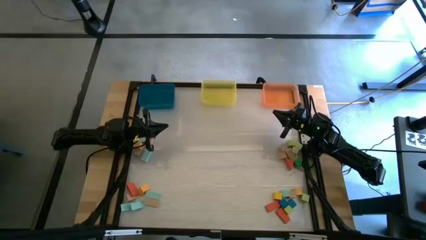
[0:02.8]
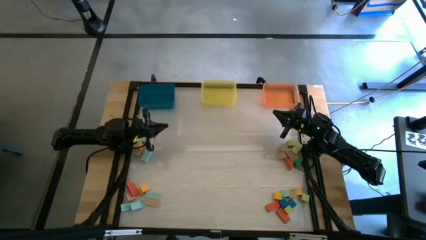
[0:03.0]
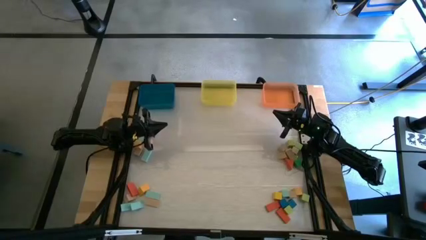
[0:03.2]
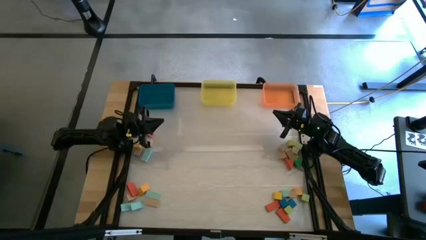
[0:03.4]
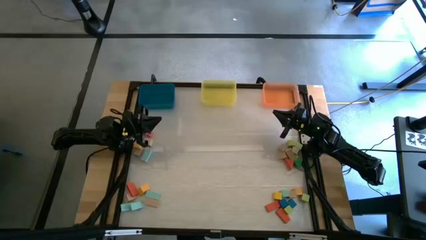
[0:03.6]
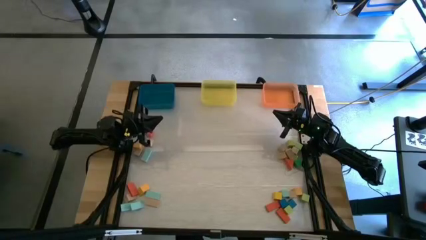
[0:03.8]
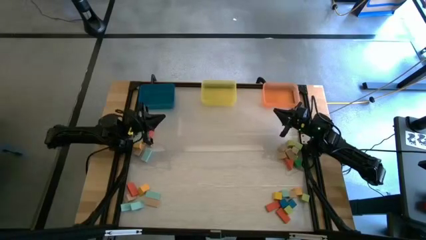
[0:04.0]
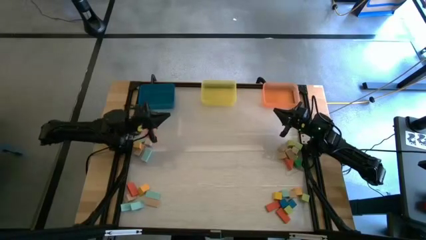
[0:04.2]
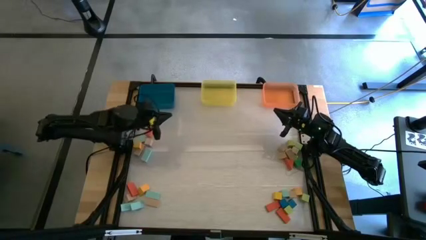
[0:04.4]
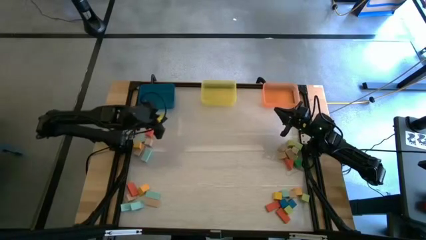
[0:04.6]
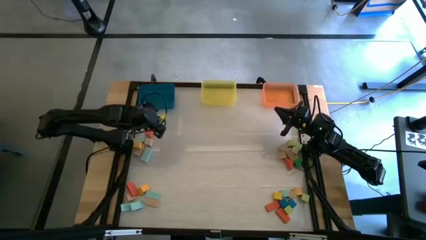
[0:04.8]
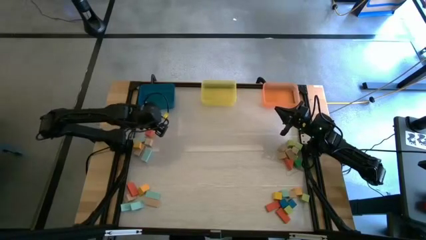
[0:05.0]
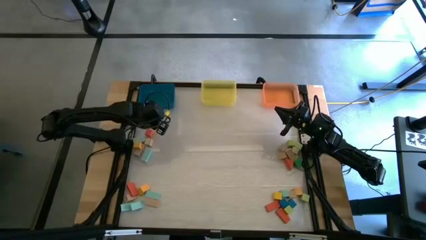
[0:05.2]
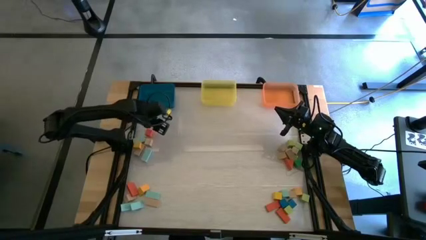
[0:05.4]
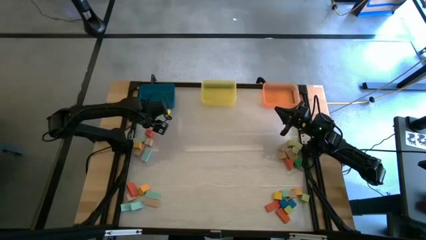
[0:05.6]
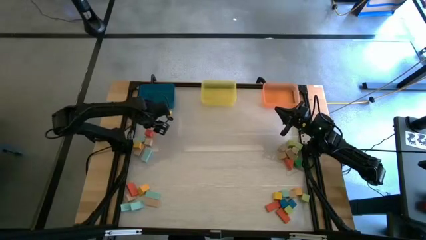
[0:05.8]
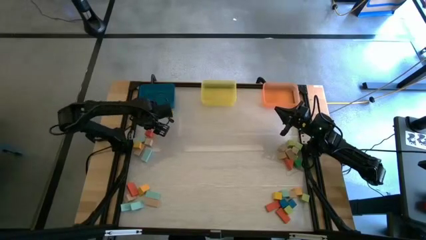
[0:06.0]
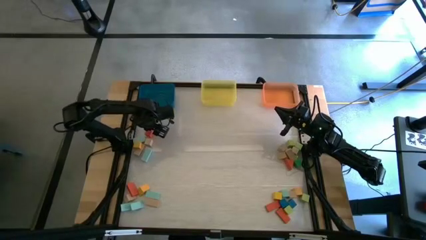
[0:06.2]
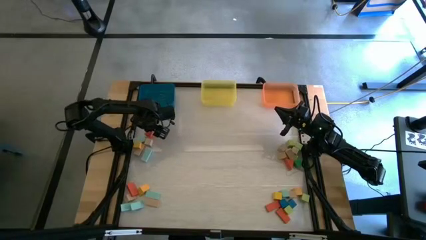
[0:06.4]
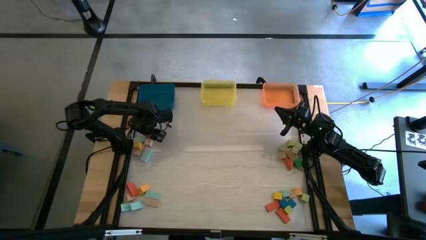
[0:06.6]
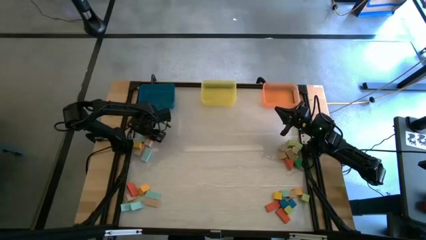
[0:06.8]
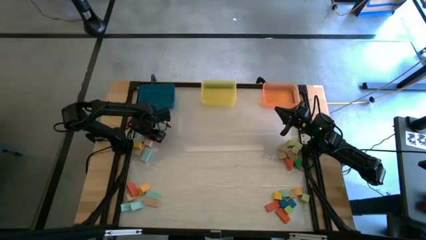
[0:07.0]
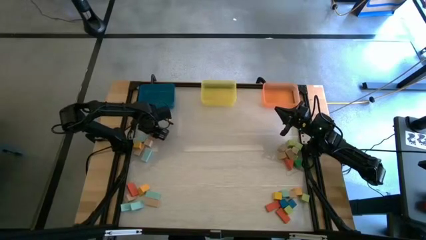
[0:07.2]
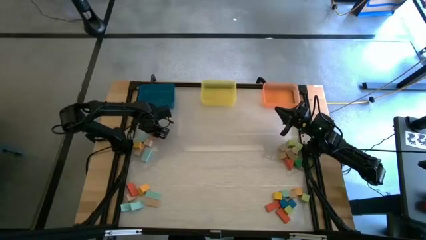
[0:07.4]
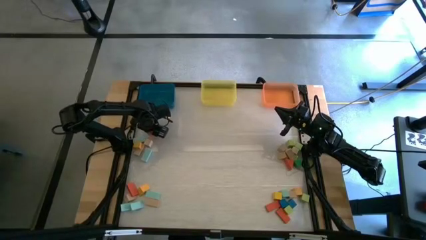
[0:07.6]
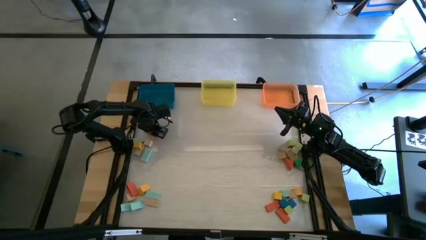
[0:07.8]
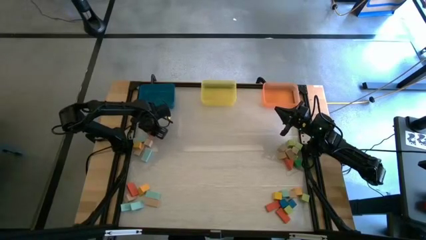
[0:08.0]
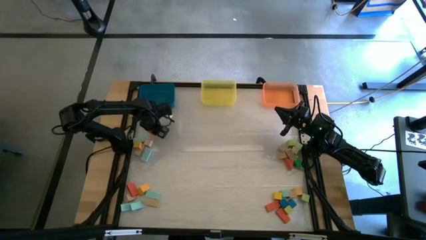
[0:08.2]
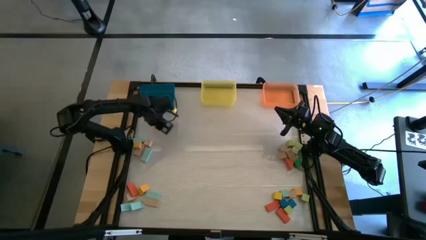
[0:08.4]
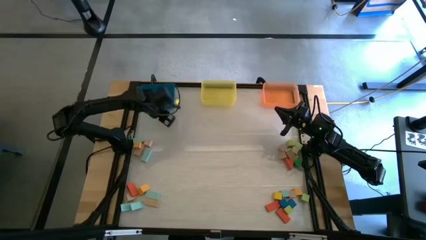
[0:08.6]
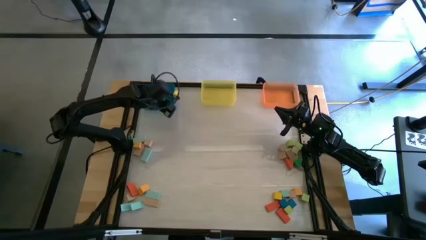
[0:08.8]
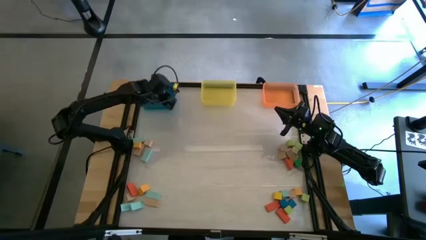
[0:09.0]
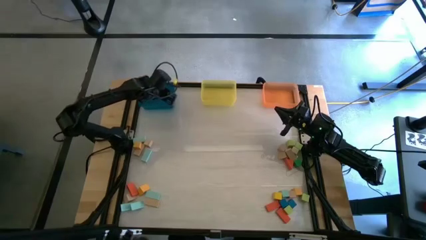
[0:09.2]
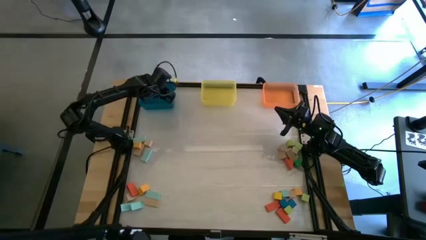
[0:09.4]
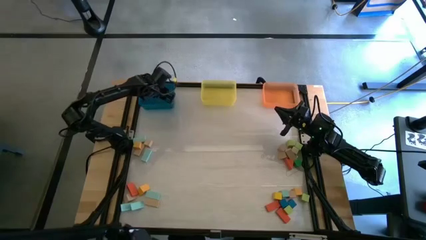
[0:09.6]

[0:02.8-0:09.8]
Task: Sort blocks by size
Put the orange square block into the blue bin

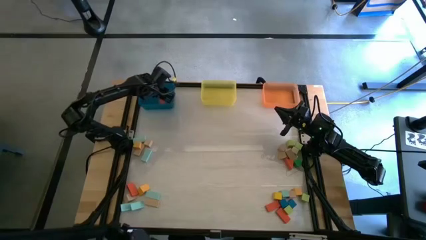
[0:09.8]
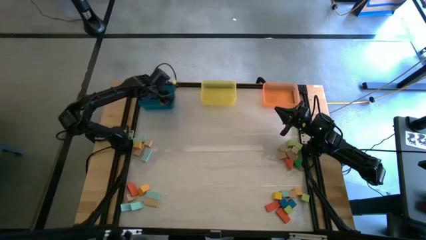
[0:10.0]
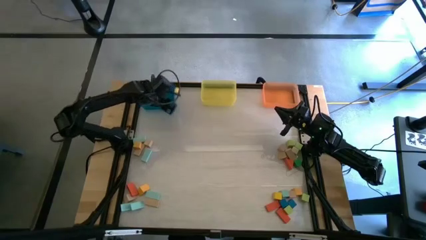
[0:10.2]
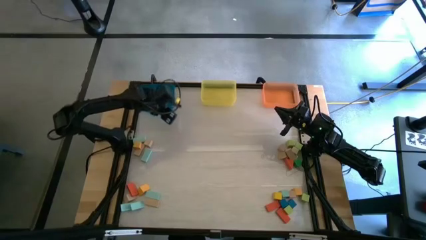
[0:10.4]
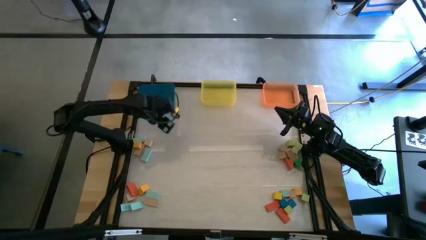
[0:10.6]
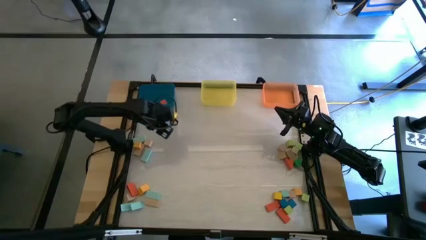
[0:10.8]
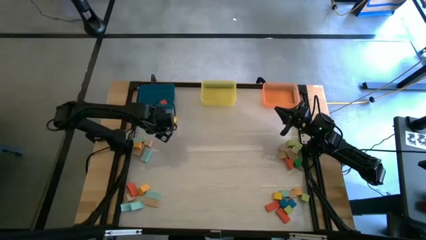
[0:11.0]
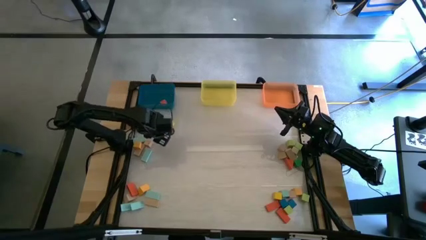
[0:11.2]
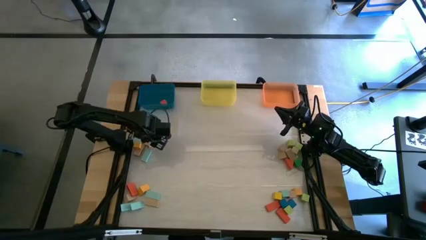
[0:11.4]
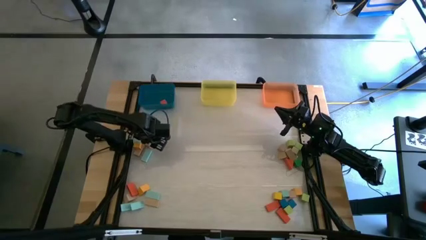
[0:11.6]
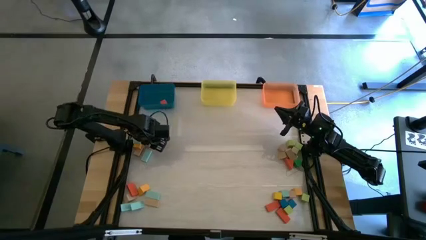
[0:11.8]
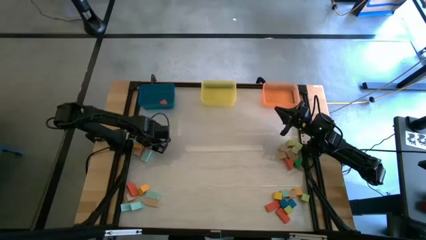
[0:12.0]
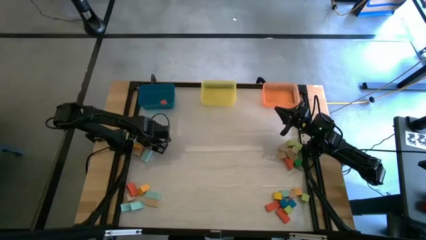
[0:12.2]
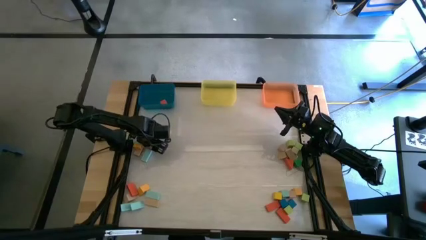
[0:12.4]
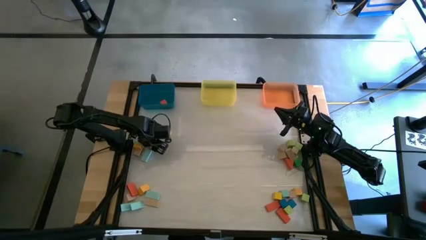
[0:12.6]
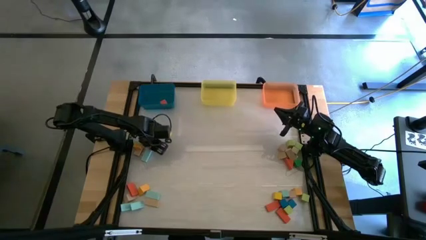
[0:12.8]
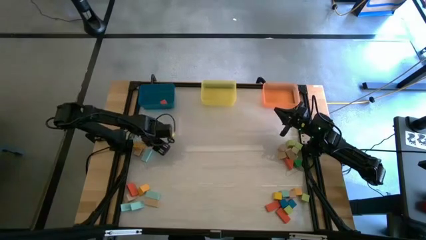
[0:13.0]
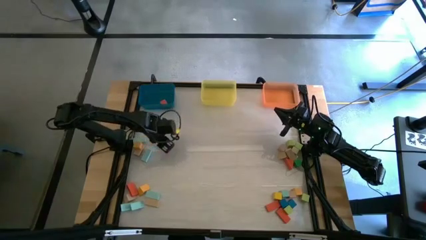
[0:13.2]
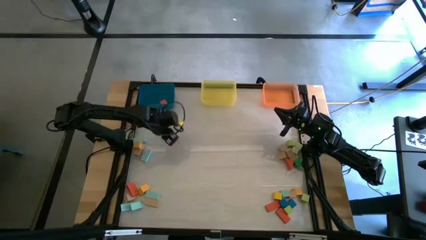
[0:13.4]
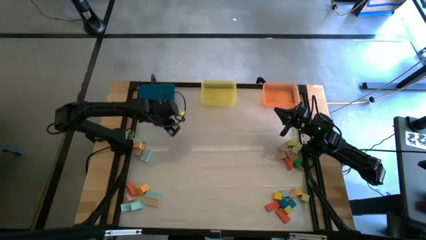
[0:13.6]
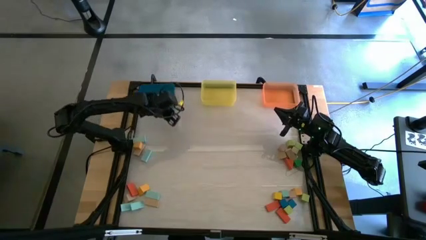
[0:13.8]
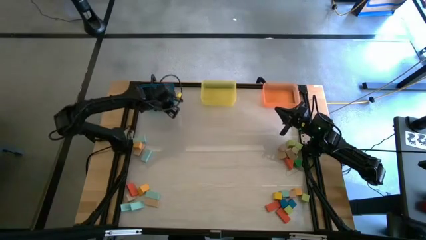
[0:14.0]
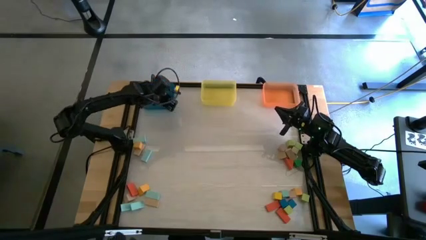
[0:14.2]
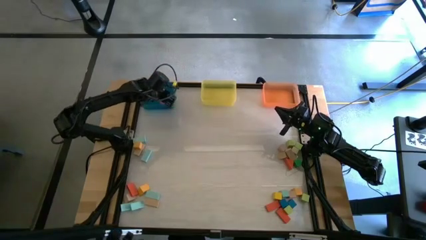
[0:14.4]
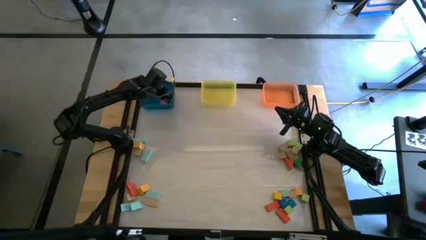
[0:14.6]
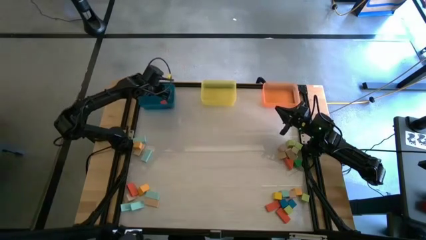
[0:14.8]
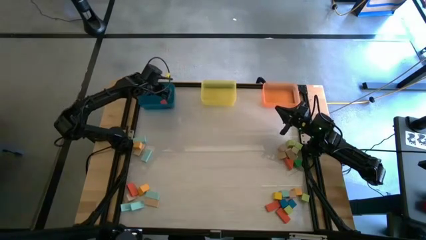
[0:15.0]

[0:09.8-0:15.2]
Put the brown square block into the blue bin

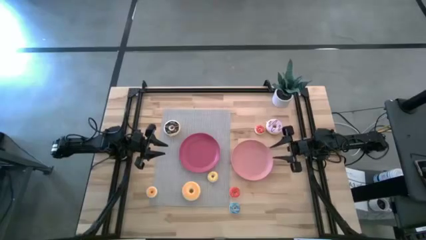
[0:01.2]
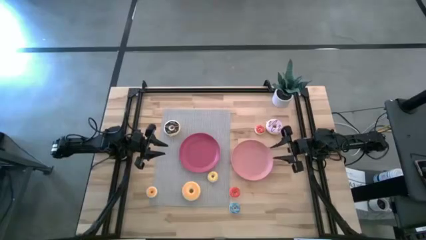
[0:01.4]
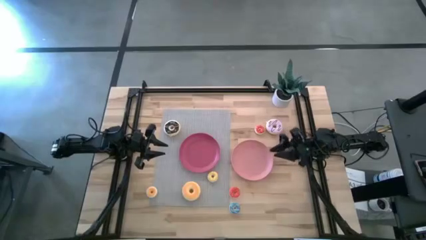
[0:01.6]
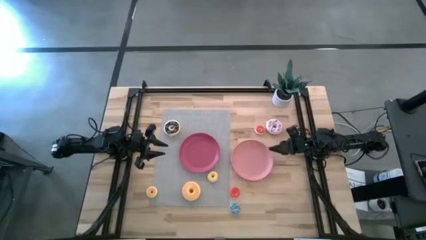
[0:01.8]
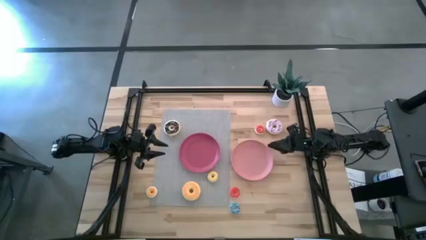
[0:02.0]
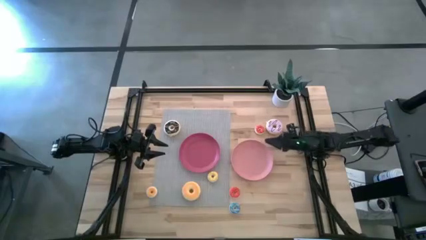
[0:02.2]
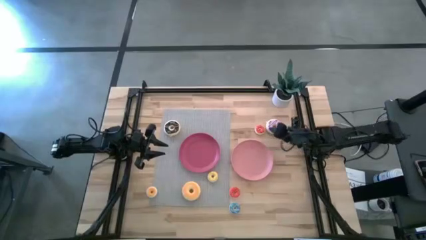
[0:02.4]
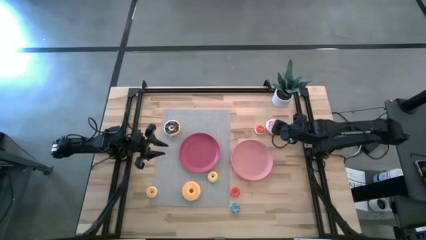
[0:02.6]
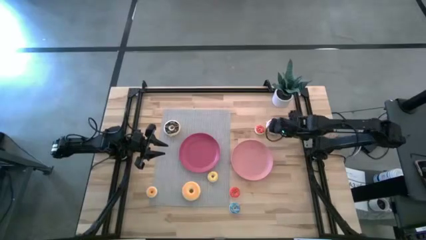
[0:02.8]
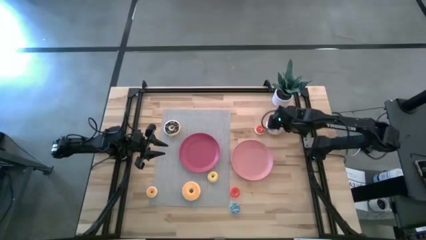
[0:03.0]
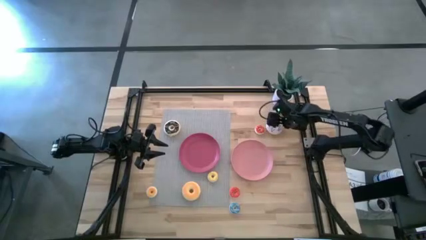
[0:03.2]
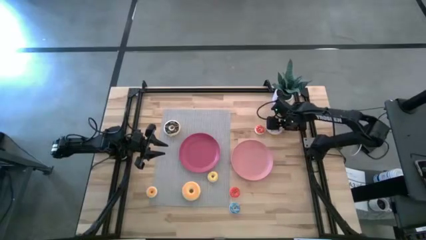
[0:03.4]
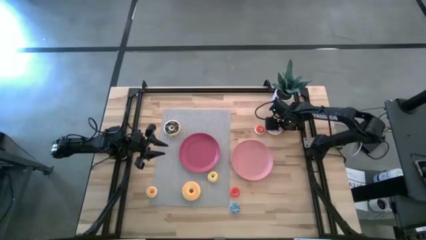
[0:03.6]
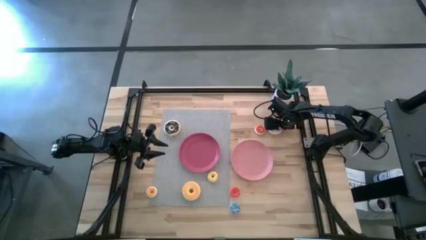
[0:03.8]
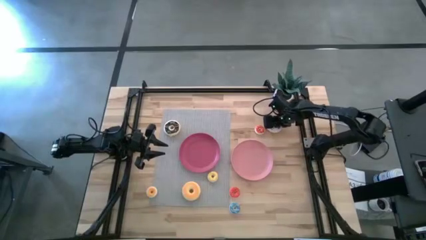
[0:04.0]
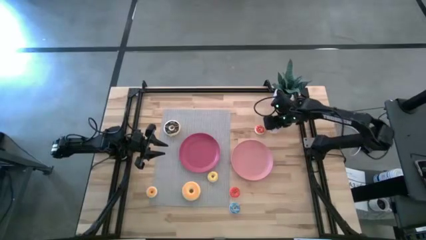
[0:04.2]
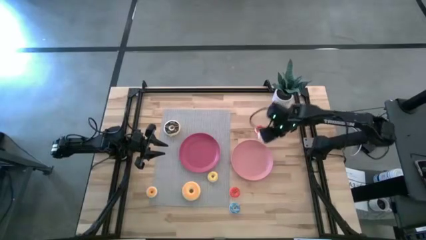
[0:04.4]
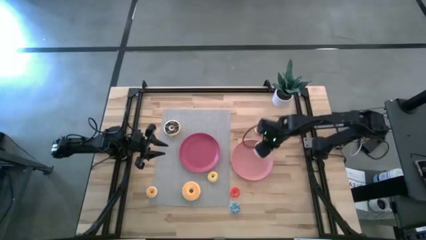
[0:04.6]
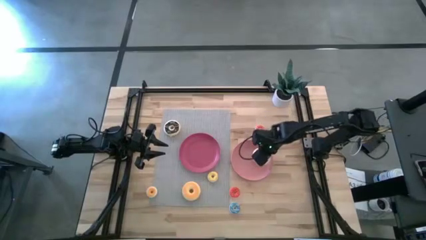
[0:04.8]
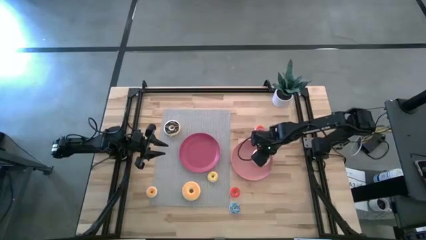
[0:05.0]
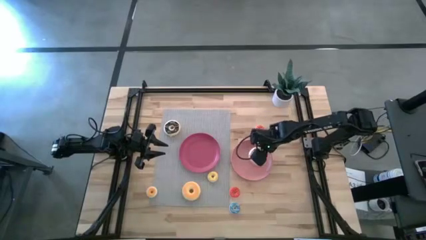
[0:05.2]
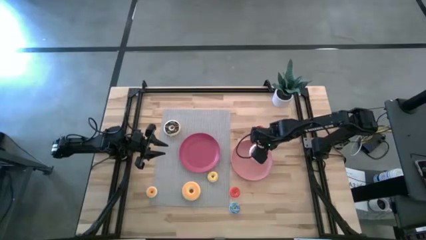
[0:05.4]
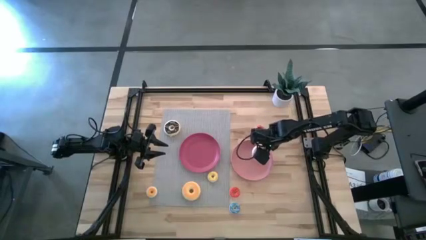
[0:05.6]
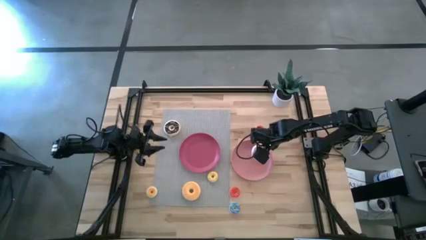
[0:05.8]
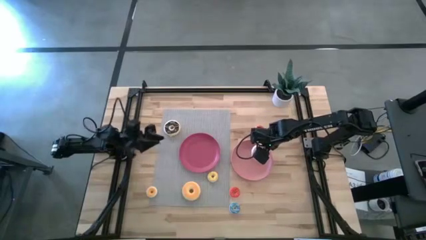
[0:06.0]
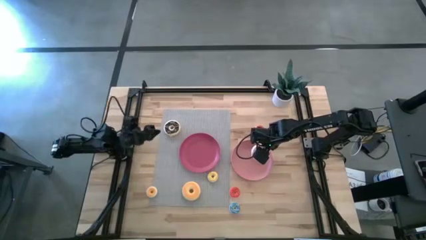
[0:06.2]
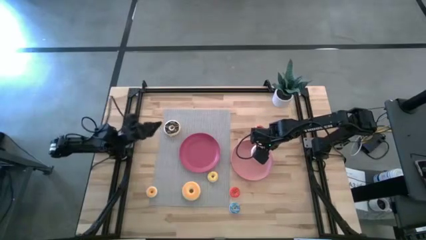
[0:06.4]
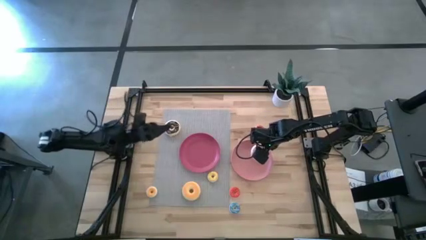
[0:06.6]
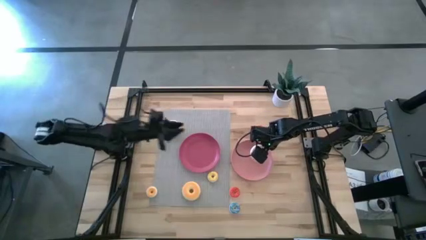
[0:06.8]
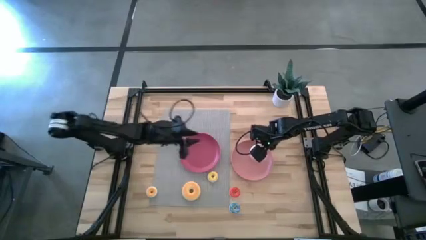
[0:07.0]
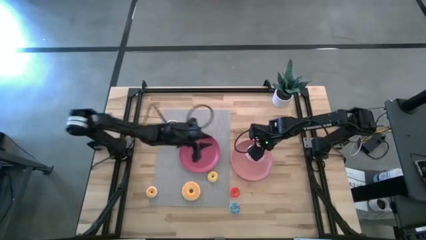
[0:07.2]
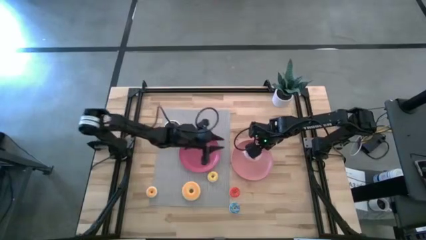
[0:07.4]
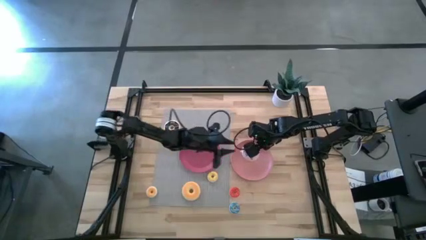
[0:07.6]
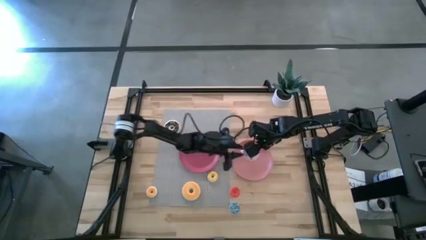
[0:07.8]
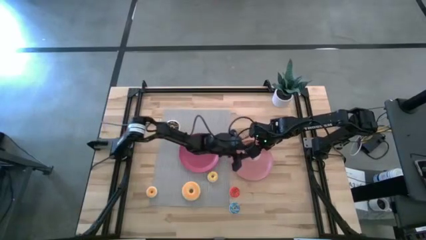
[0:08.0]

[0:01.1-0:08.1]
Task: Pick & Place donuts
Put the large purple donut into the light pink plate
